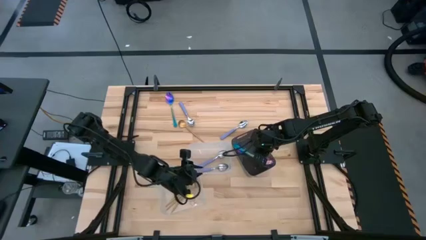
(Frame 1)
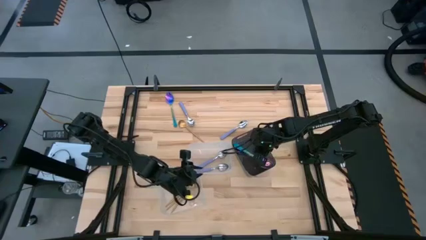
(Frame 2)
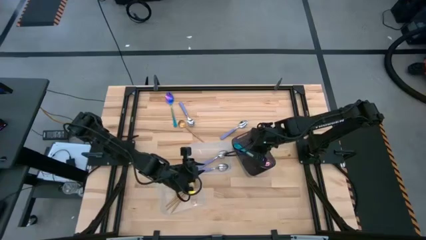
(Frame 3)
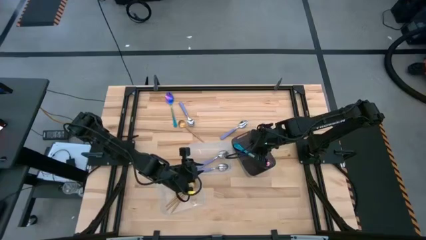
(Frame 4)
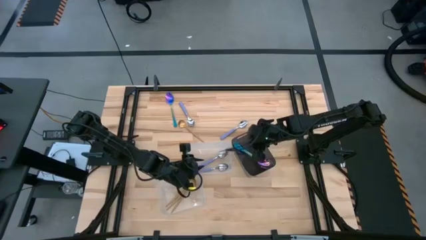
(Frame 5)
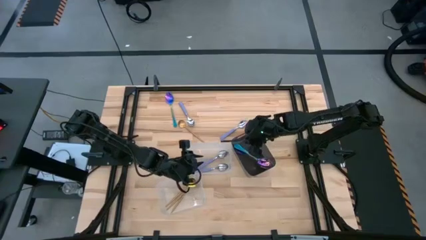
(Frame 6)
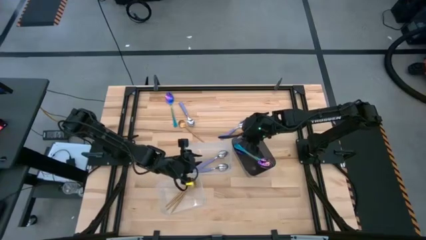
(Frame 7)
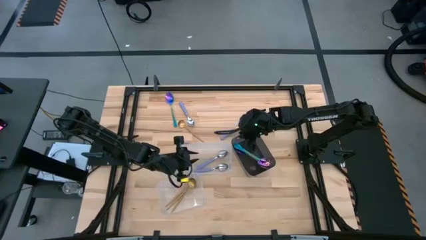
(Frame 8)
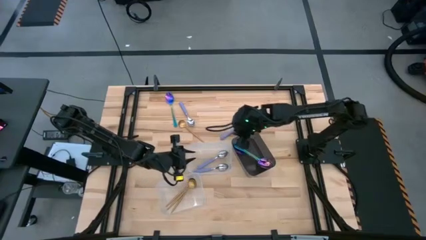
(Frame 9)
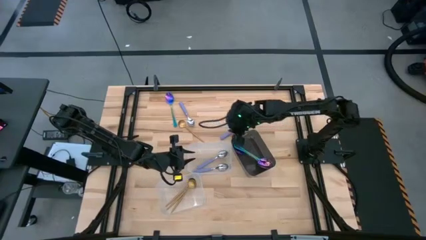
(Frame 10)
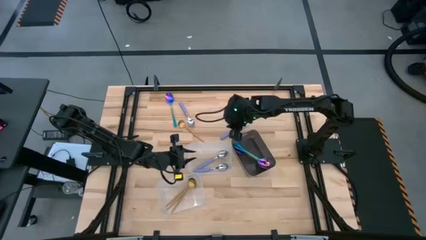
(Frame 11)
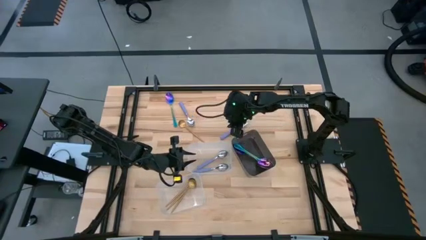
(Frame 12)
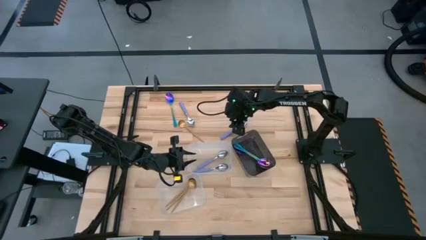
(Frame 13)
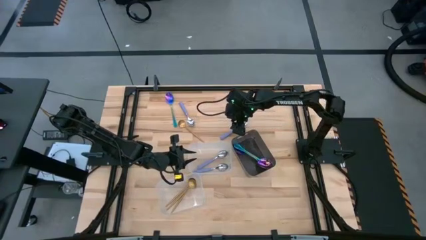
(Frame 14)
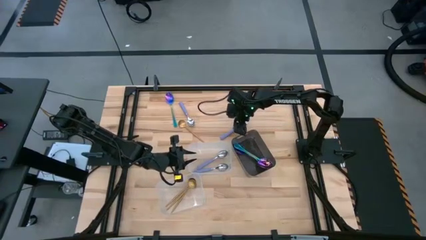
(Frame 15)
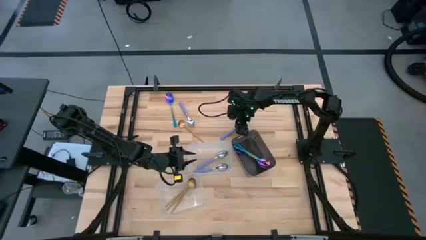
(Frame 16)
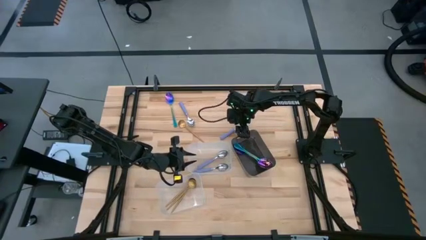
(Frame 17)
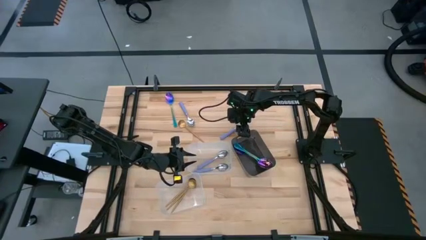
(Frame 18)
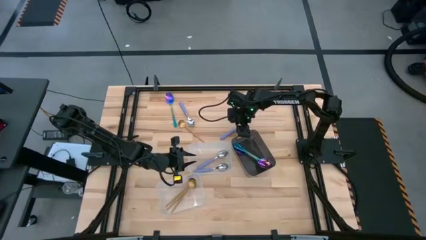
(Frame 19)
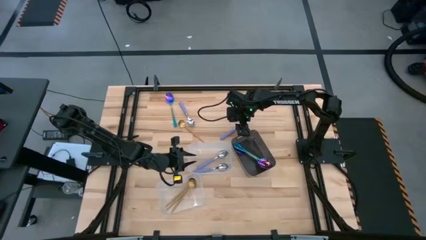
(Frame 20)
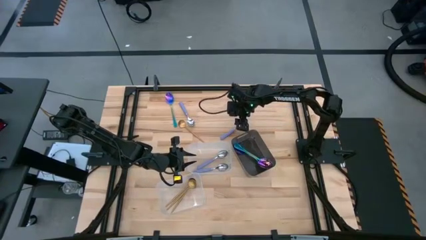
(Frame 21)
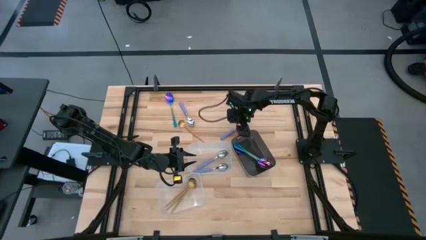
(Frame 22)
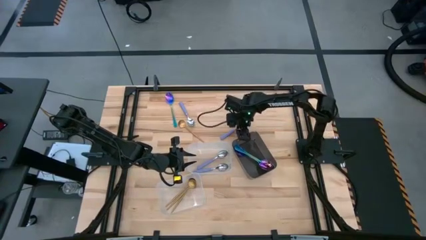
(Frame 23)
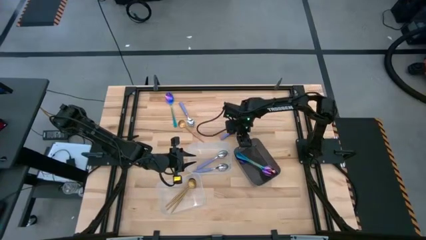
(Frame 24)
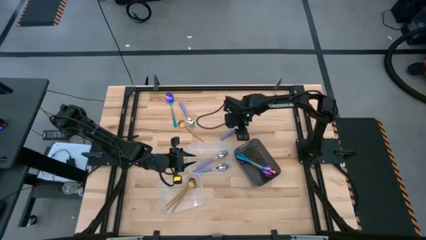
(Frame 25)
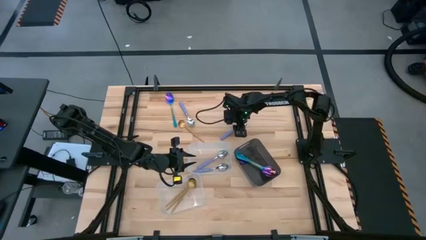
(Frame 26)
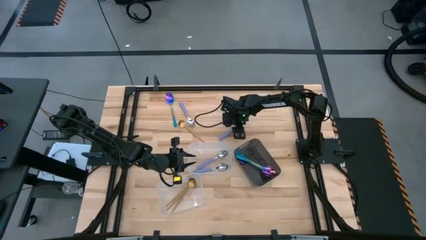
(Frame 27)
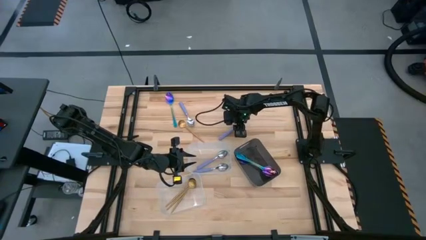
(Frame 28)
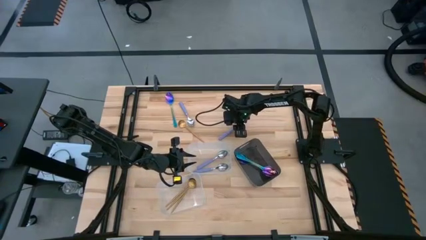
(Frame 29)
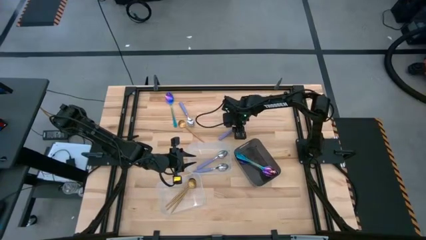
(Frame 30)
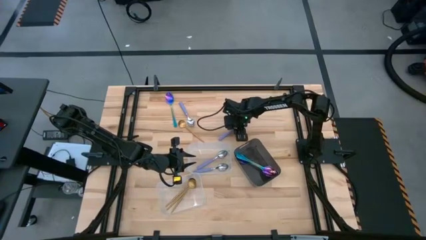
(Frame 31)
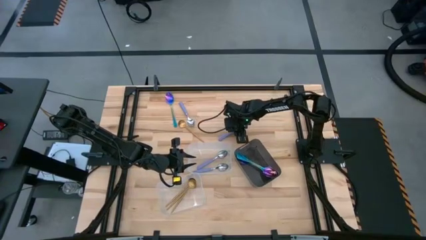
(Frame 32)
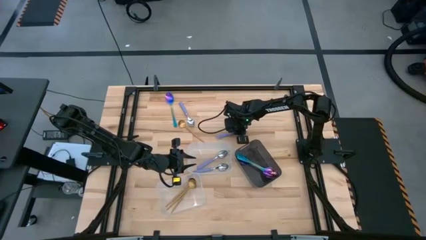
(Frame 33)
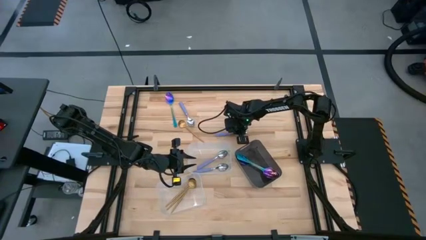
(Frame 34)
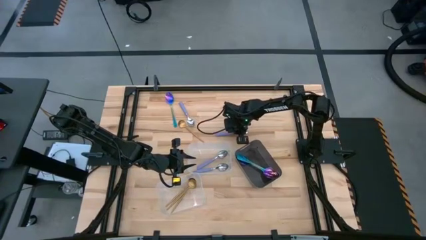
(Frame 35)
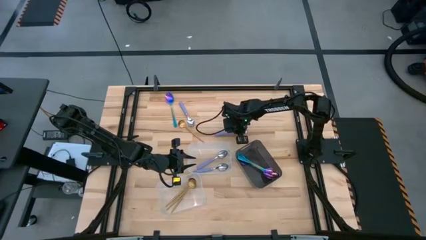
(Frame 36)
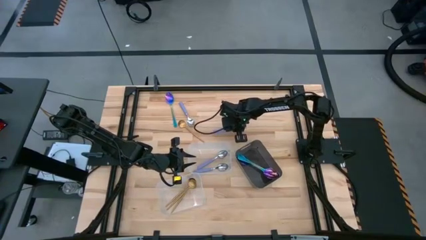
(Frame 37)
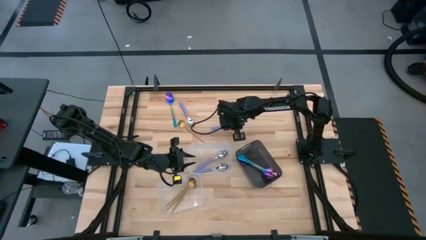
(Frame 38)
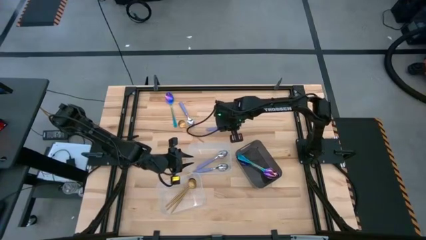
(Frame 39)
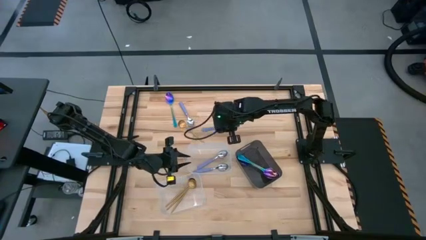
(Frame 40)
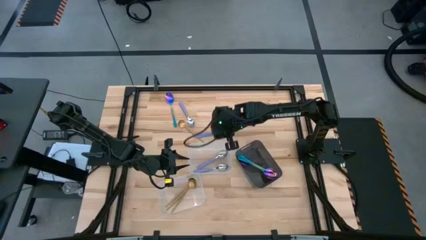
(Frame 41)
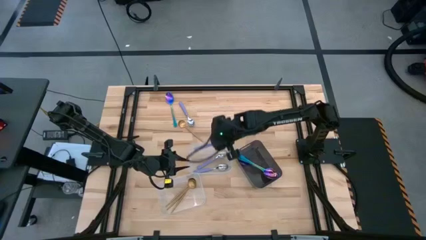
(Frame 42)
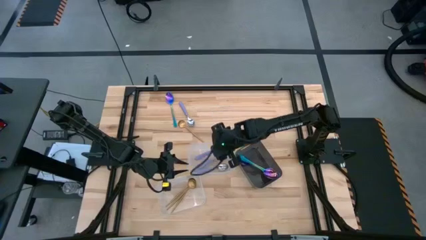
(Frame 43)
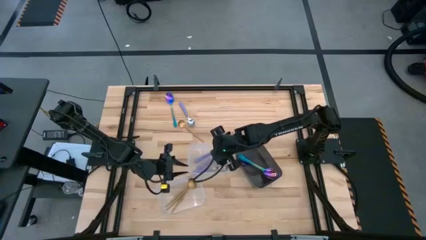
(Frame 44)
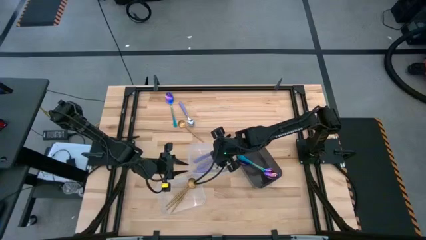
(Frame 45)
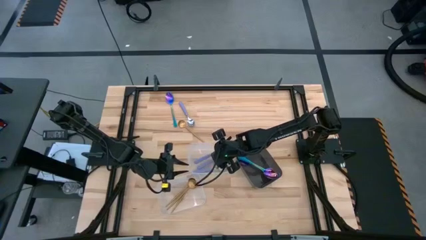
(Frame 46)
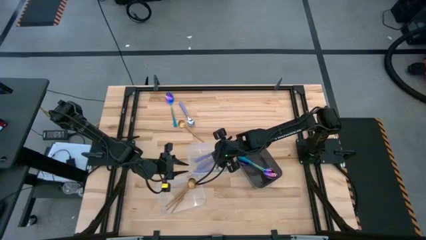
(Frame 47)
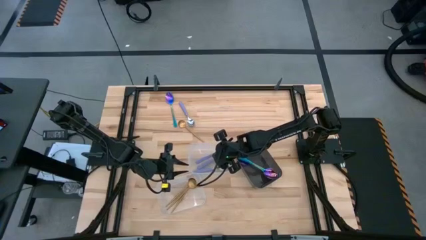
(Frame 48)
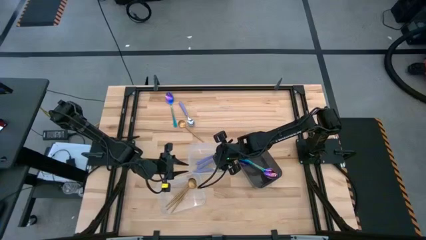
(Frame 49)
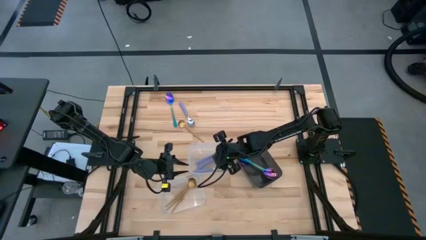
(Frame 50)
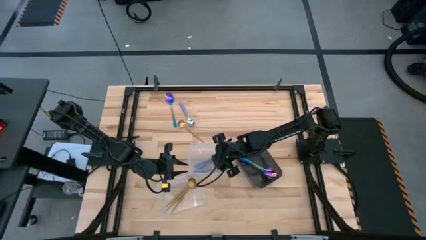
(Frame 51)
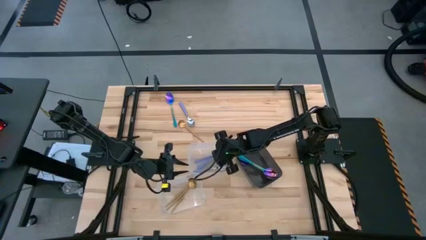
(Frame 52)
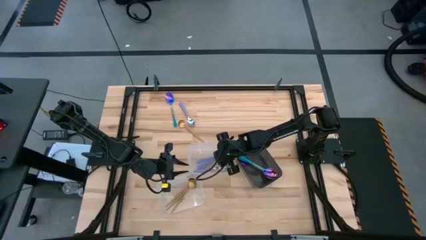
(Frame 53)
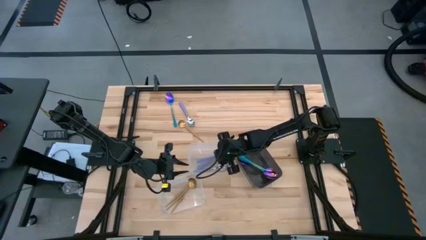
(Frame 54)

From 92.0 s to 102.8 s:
Task: Sort silverware by color (type)
Put the blue spoon into the top transparent bin

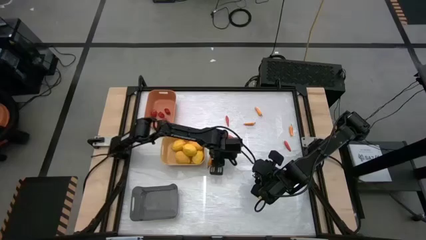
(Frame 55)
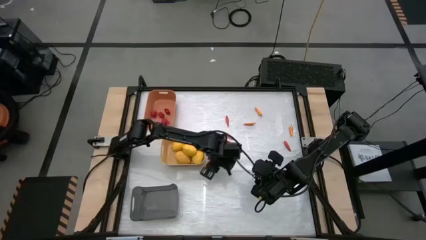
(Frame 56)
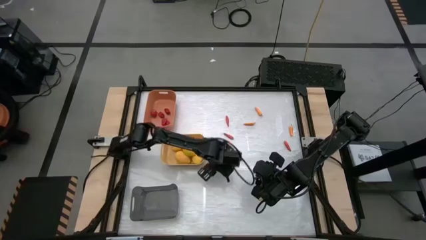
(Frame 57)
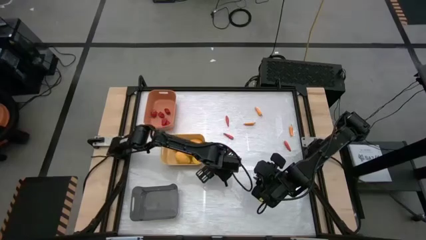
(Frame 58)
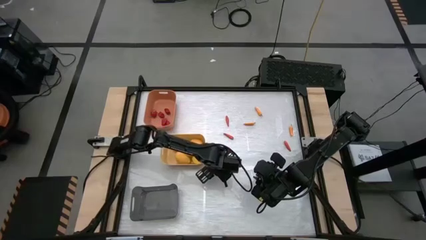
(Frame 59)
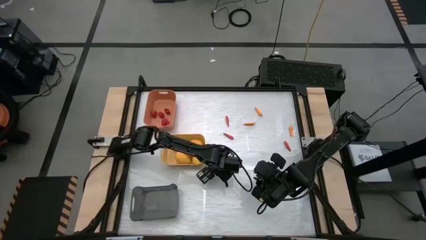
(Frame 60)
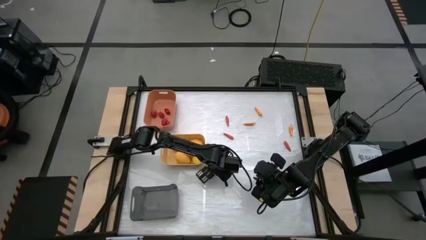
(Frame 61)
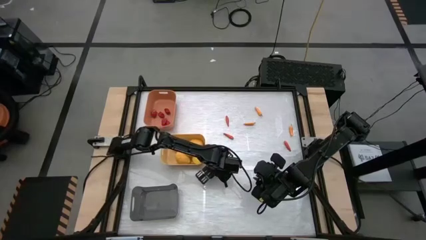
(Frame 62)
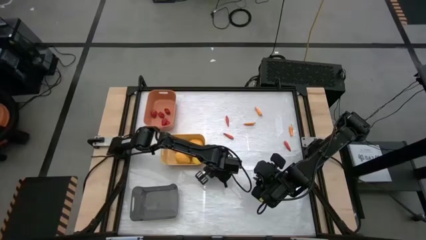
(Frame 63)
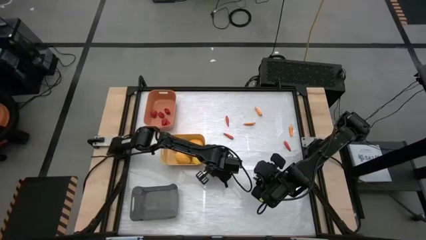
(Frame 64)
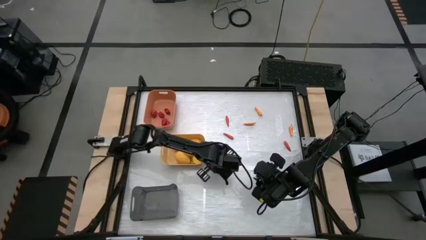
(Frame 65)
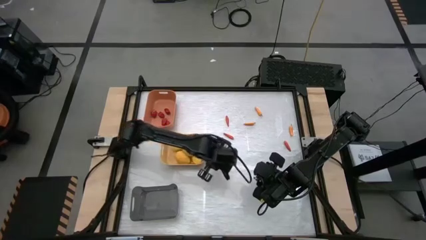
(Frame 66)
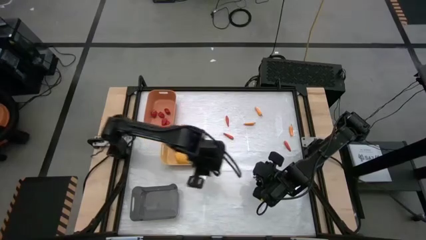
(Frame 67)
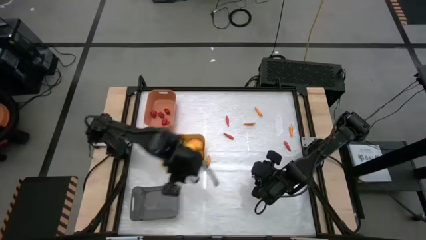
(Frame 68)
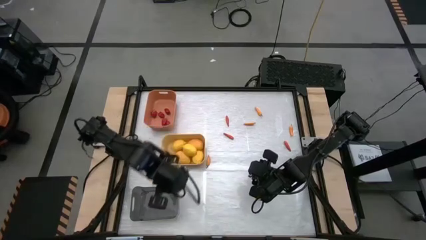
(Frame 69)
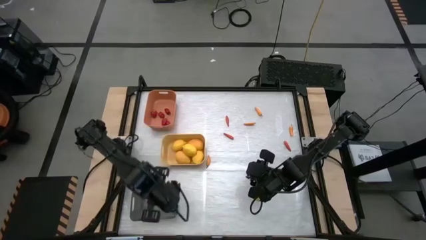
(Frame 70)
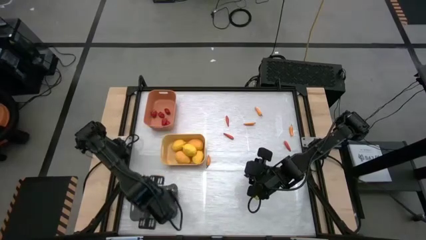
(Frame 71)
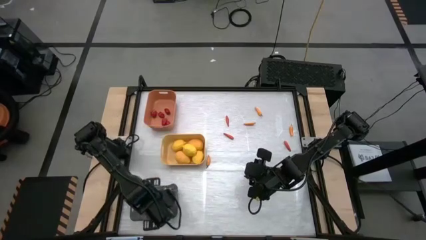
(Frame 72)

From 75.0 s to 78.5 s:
Task: Sort produce into baskets
Put the yellow chili pepper into the gray bin
